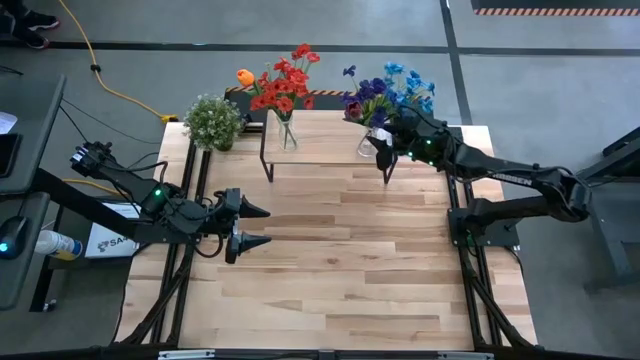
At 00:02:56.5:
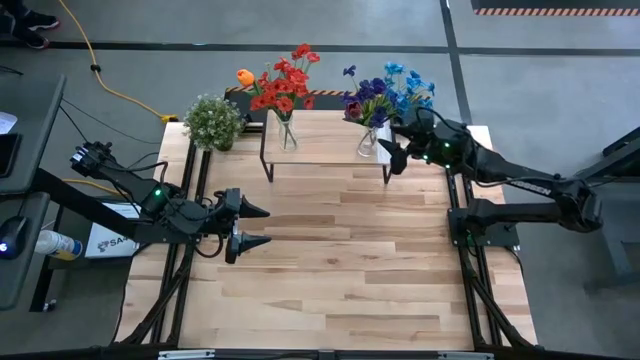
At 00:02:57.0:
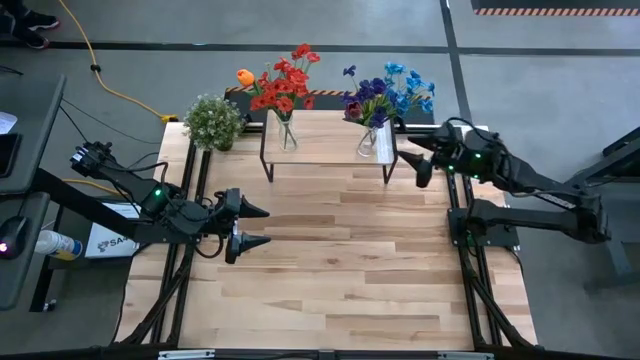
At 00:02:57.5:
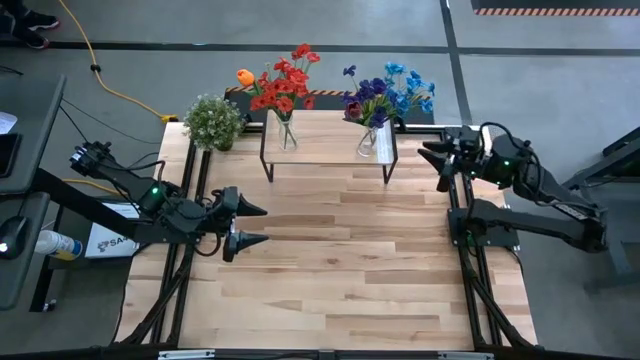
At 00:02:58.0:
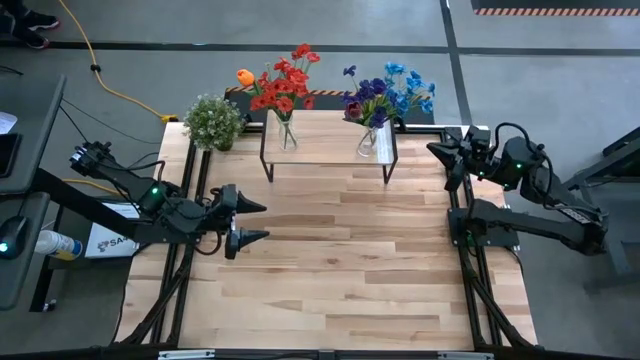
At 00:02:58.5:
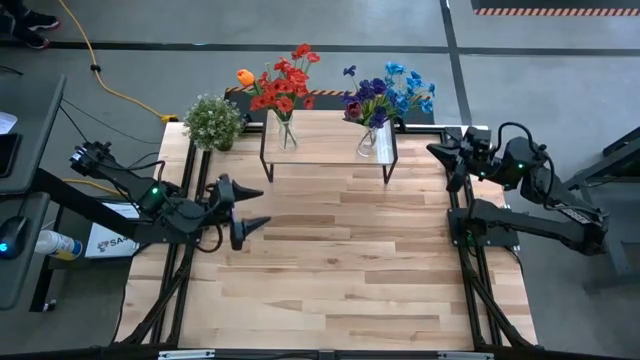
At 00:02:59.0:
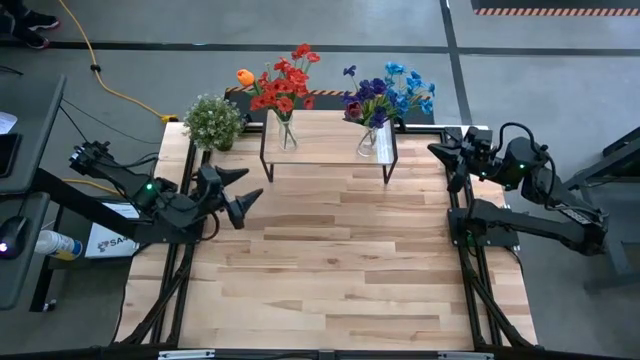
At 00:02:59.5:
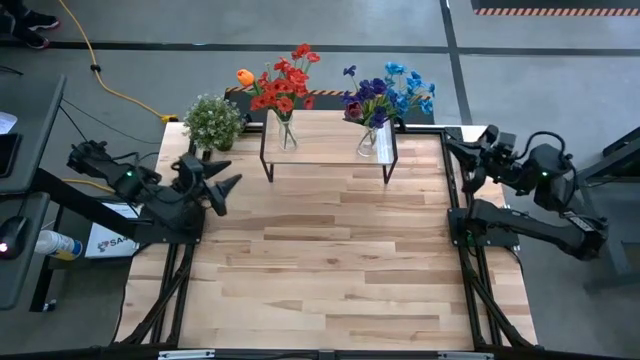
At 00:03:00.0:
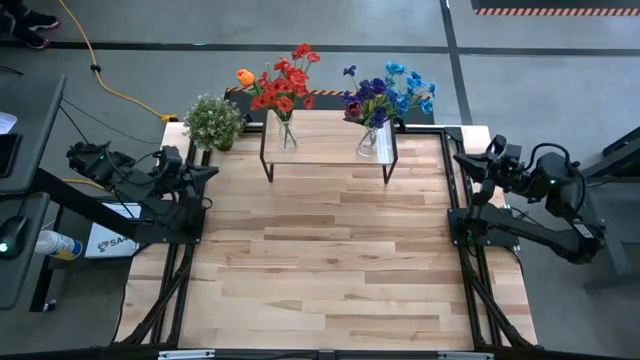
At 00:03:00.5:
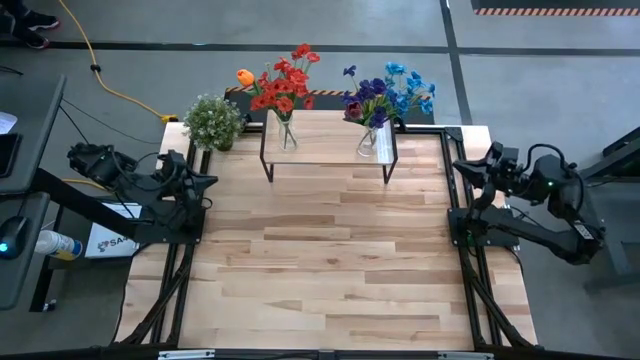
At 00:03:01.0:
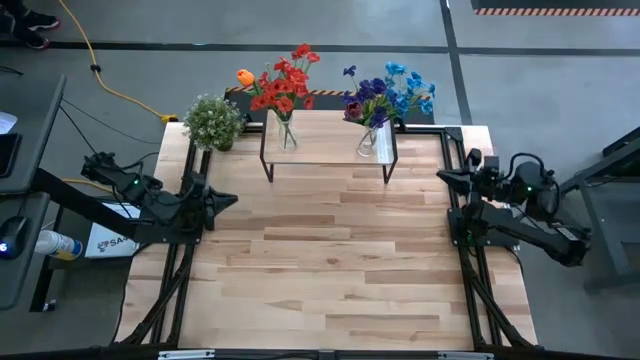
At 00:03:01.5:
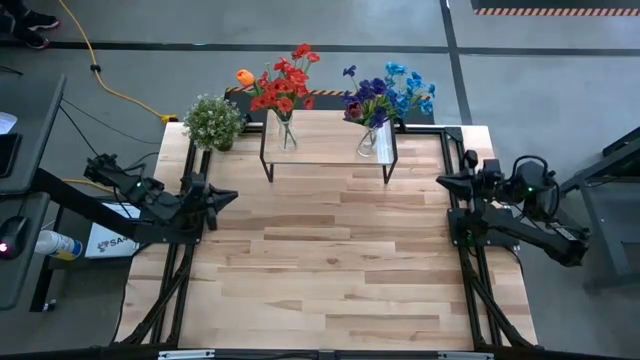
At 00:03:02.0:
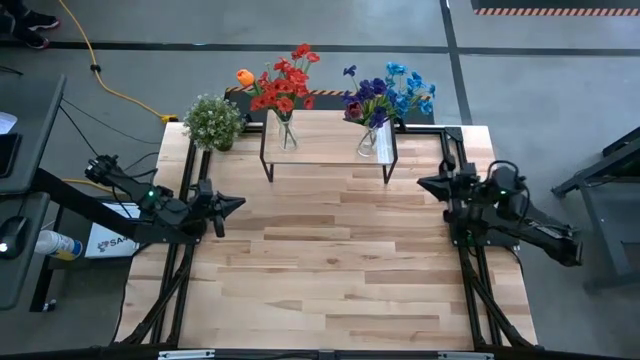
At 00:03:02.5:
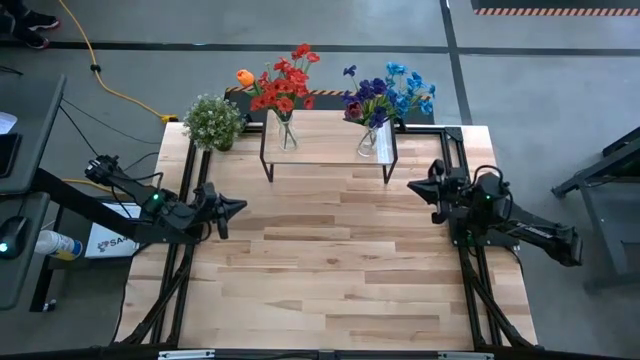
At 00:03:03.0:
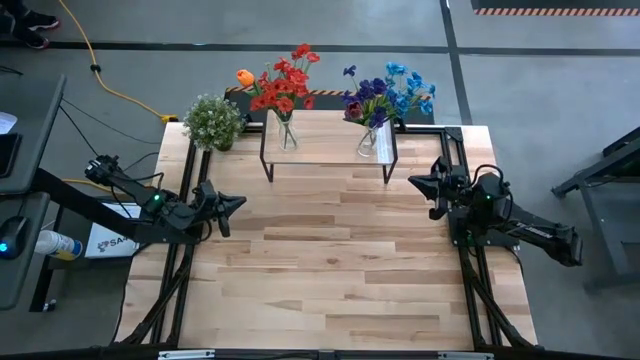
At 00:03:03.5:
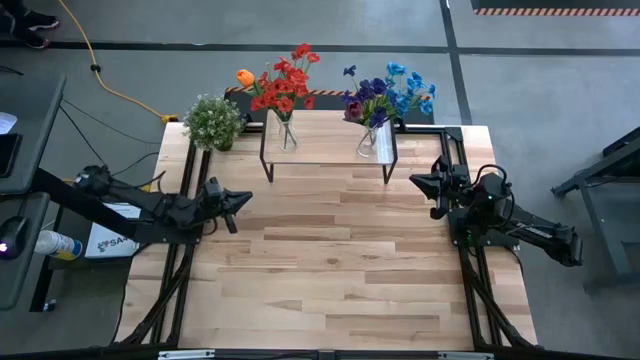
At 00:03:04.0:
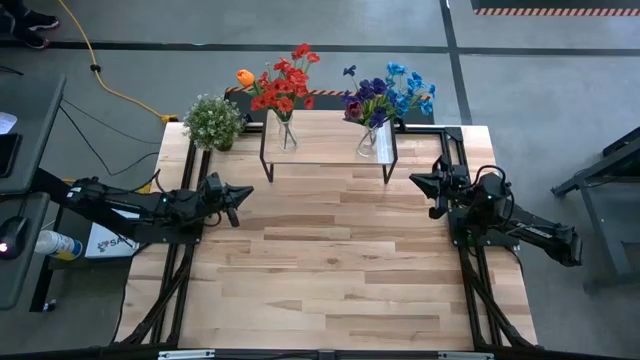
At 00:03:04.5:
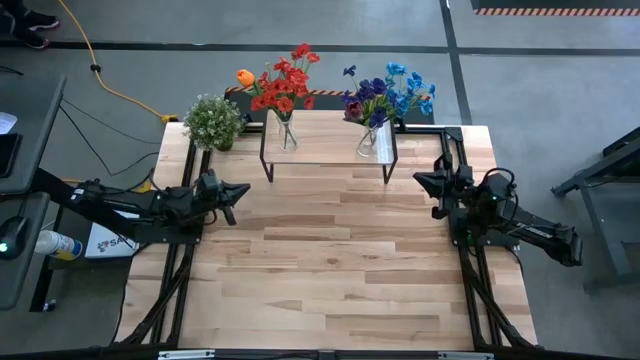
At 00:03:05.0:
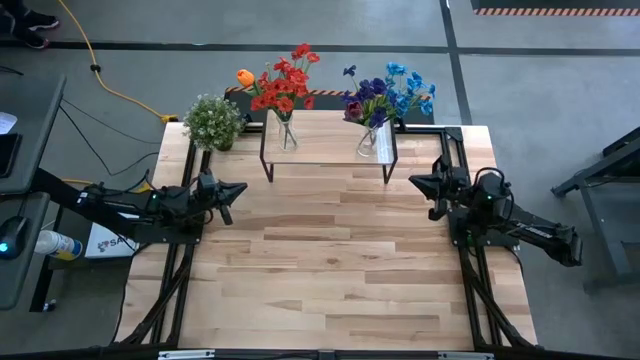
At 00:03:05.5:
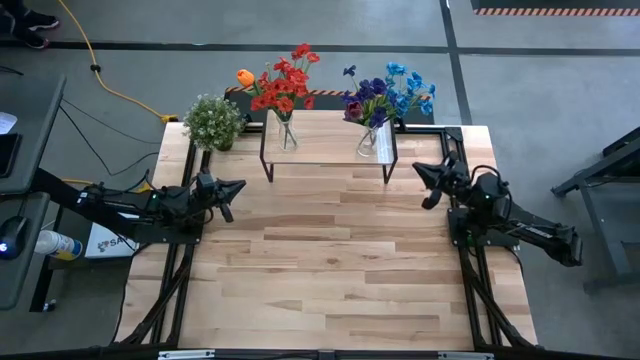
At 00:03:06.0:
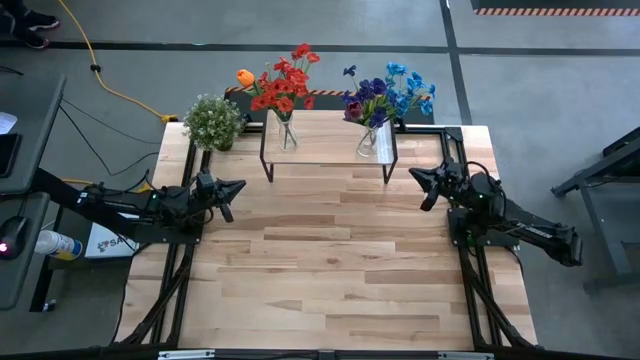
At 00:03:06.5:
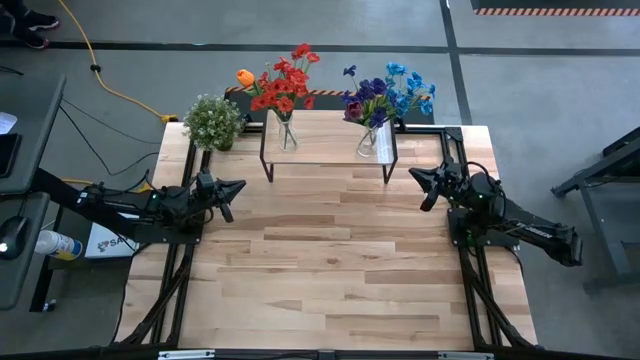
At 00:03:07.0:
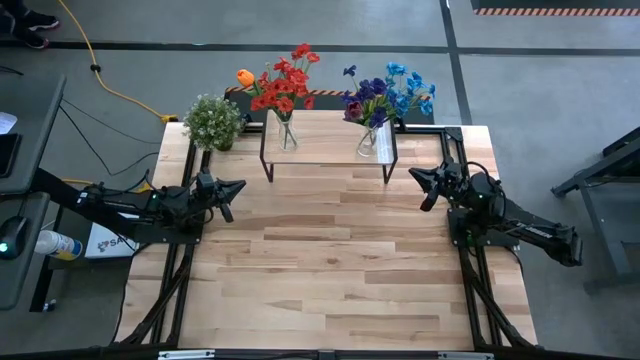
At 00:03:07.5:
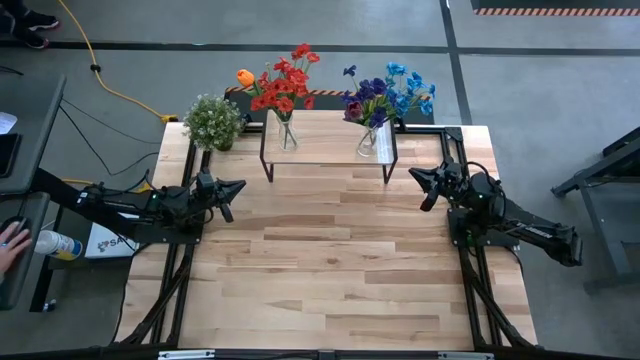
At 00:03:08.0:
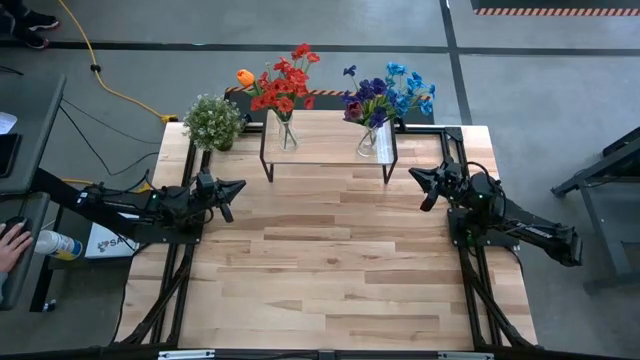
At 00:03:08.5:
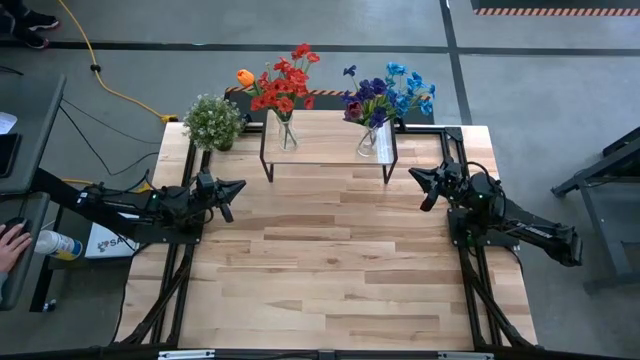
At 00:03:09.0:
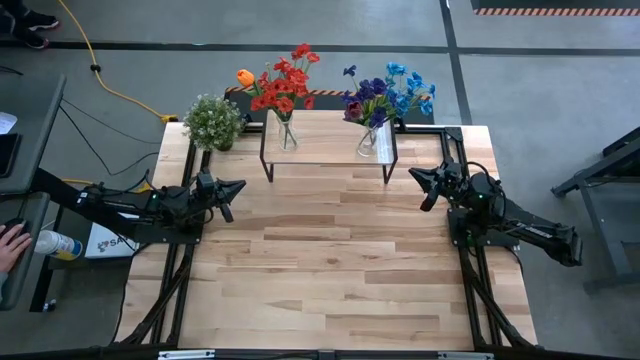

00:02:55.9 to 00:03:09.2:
Task: Pick and place flowers into a vace then onto a shelf
Return to Home Position

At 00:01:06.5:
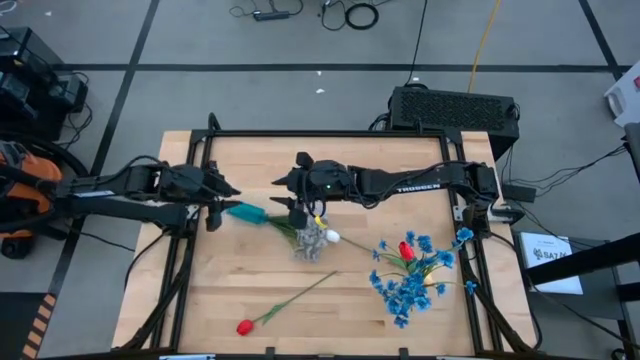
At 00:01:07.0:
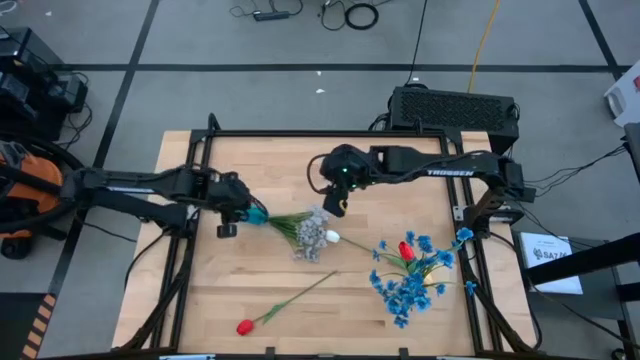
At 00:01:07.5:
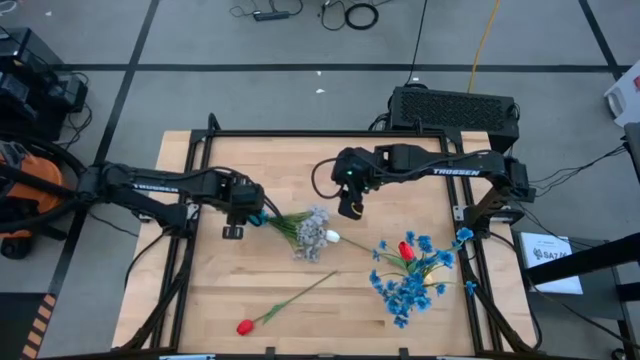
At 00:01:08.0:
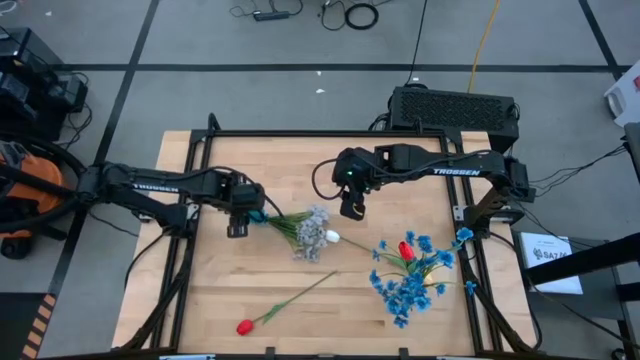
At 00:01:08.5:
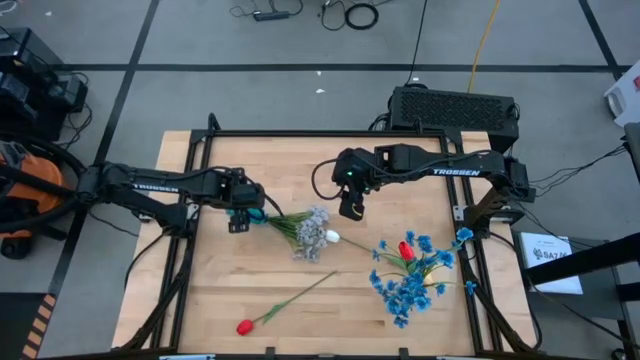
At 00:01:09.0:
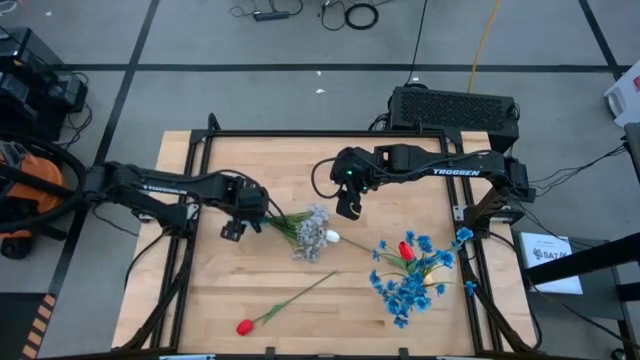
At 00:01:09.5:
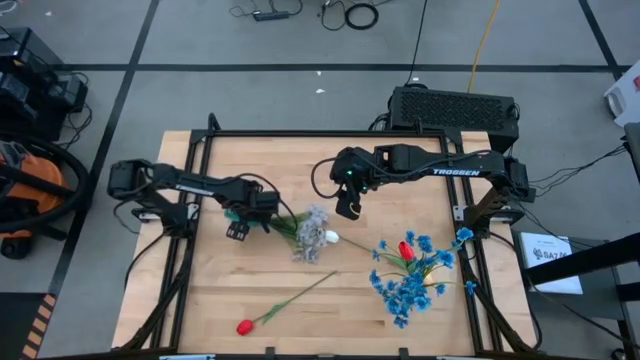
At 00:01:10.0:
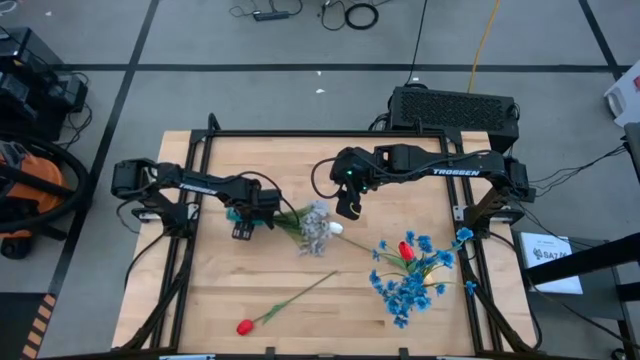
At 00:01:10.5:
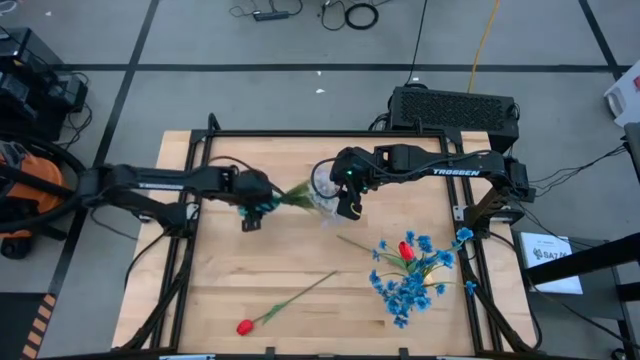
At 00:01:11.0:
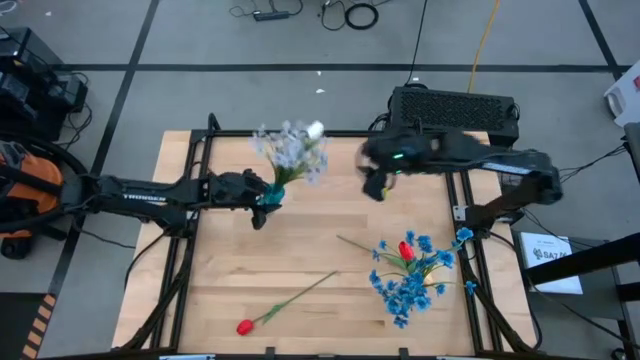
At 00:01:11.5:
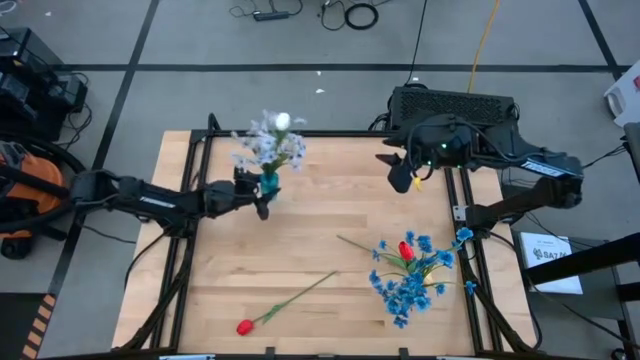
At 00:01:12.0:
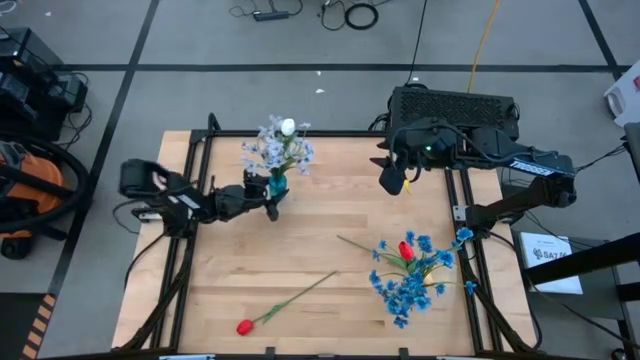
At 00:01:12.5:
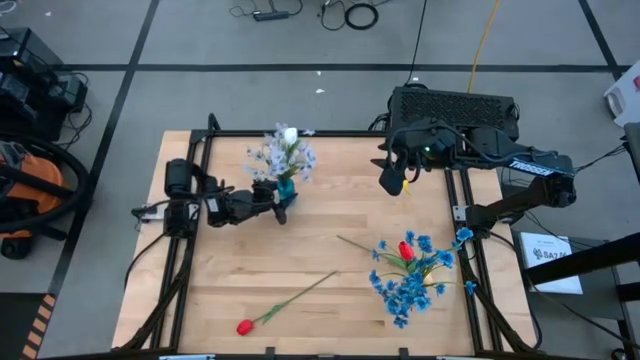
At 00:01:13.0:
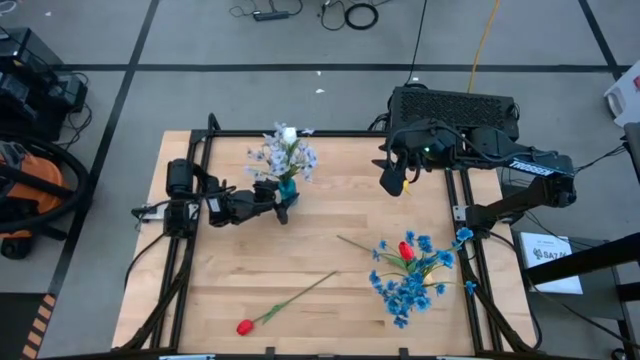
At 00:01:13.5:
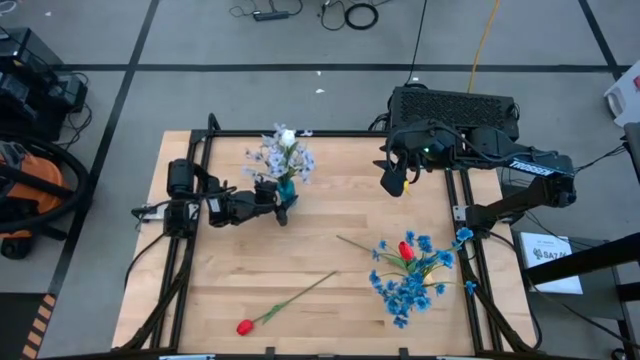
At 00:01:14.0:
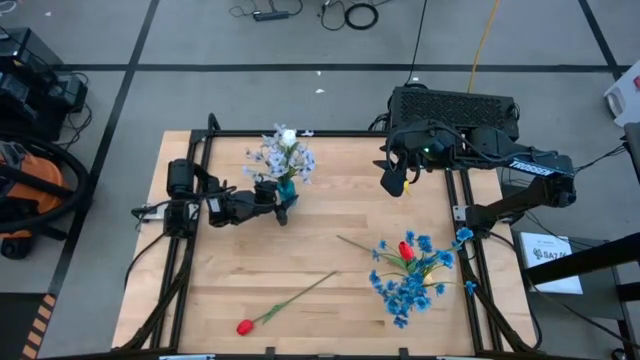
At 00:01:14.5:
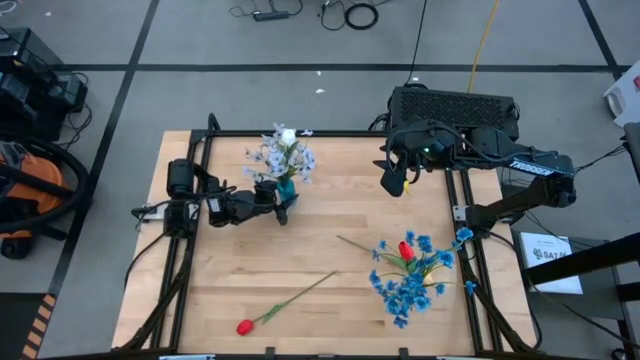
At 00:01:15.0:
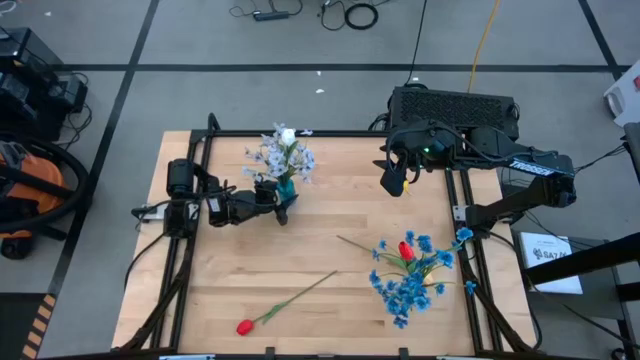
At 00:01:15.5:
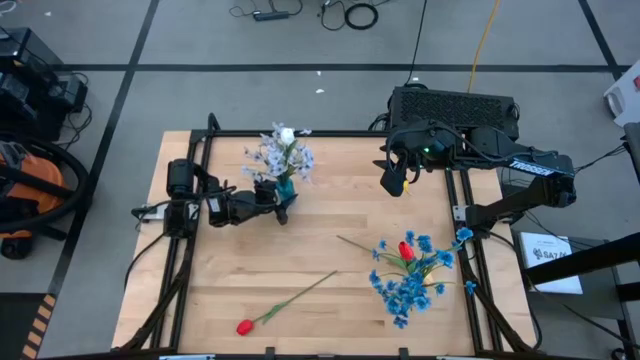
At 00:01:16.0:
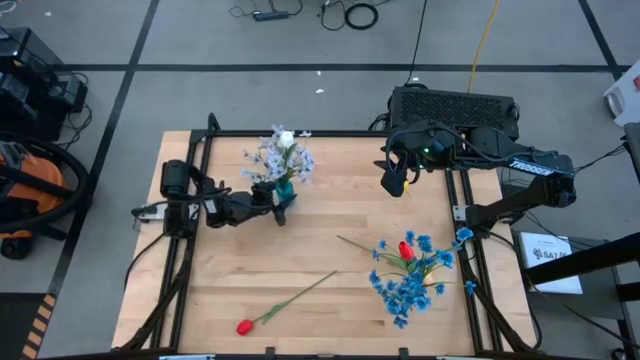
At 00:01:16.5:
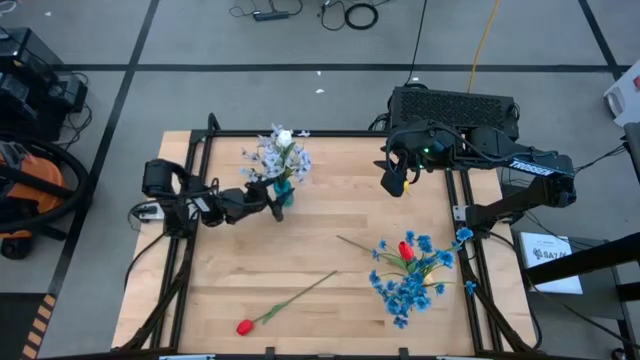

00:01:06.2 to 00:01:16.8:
Task: Sort flowers into vase by color
Adjust the blue transparent vase
